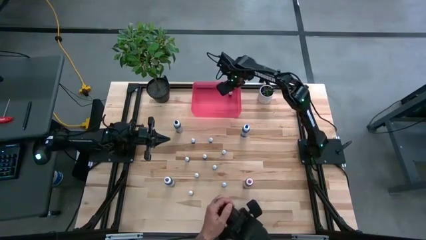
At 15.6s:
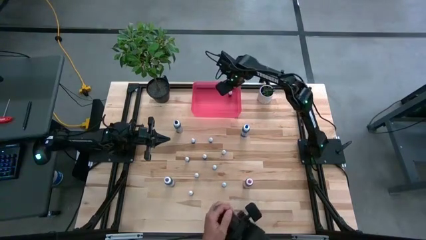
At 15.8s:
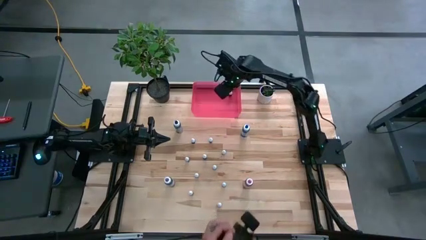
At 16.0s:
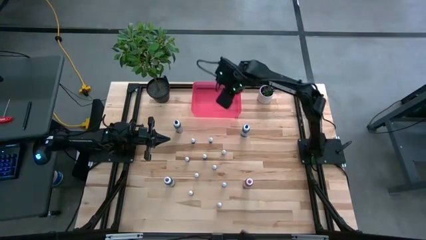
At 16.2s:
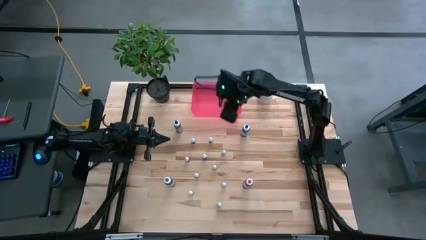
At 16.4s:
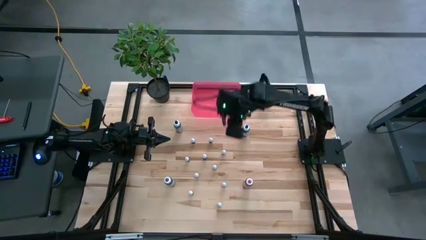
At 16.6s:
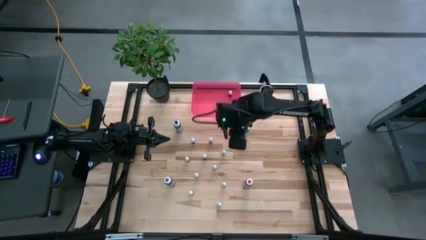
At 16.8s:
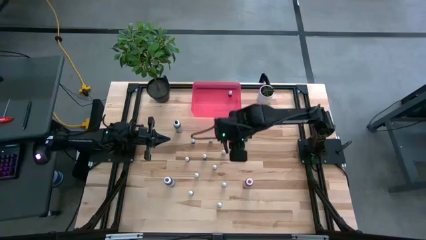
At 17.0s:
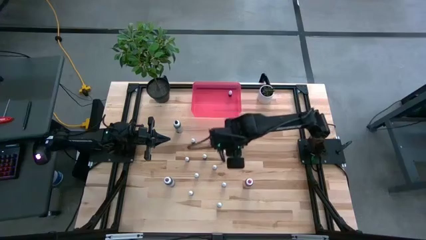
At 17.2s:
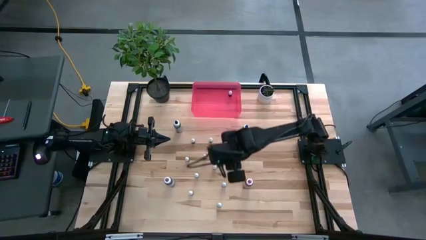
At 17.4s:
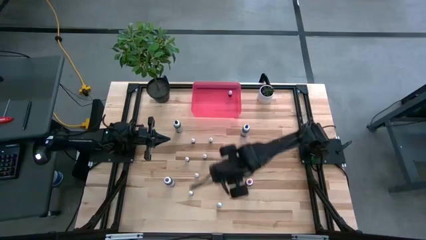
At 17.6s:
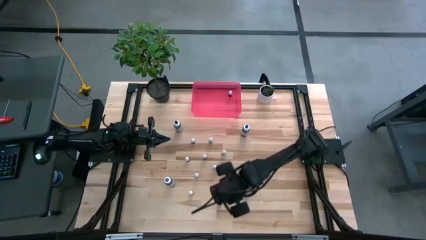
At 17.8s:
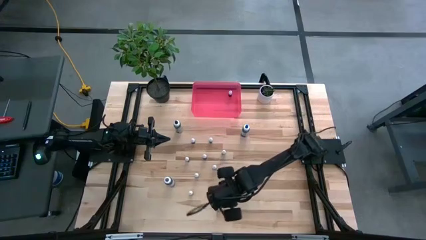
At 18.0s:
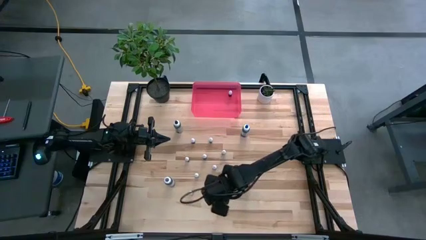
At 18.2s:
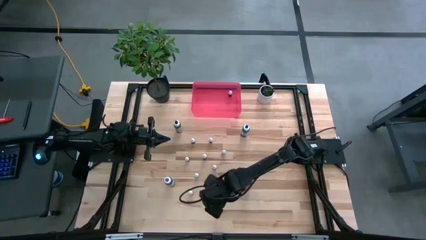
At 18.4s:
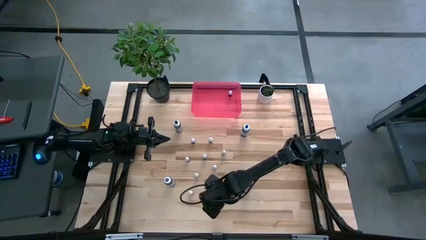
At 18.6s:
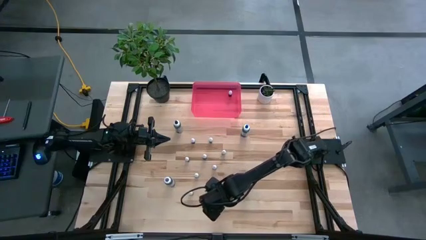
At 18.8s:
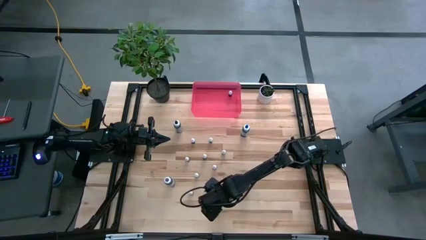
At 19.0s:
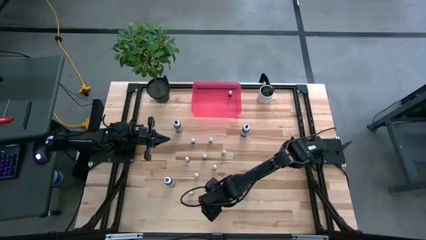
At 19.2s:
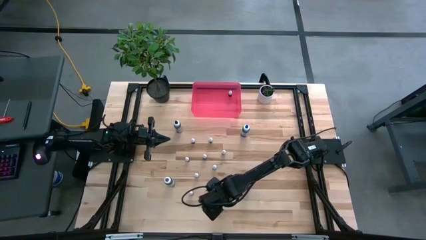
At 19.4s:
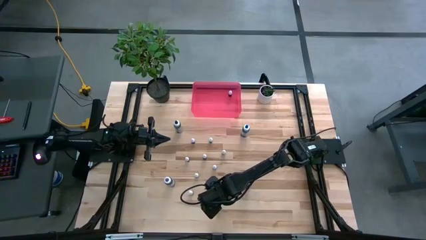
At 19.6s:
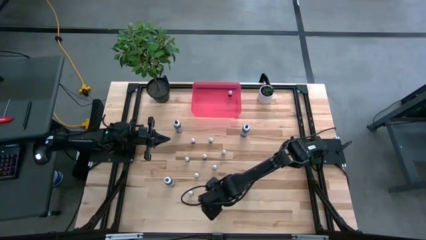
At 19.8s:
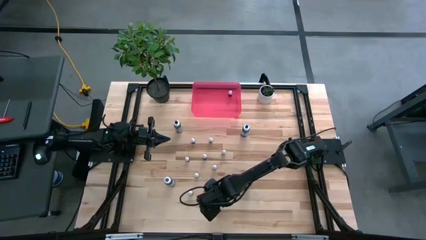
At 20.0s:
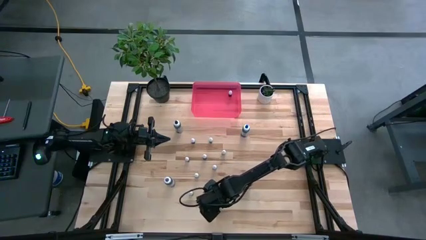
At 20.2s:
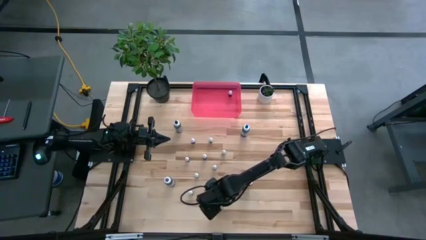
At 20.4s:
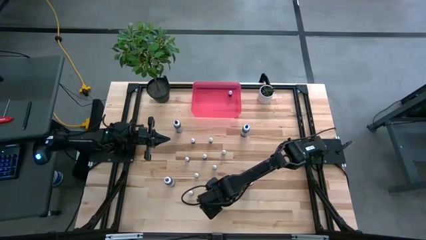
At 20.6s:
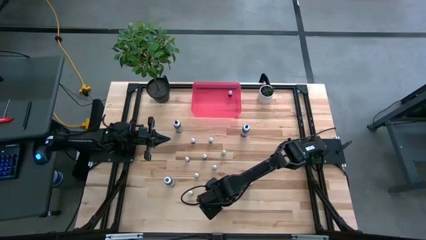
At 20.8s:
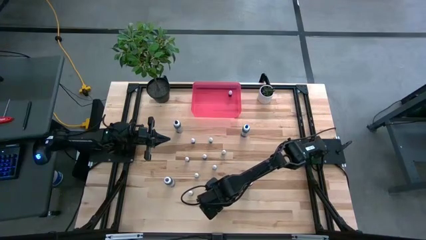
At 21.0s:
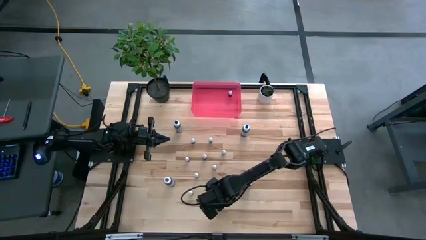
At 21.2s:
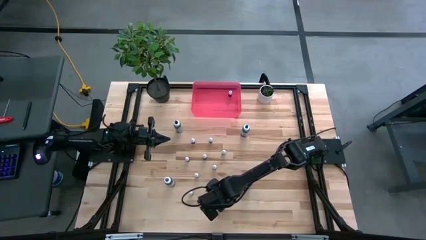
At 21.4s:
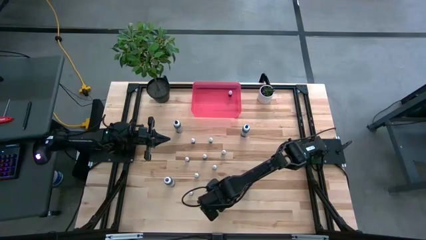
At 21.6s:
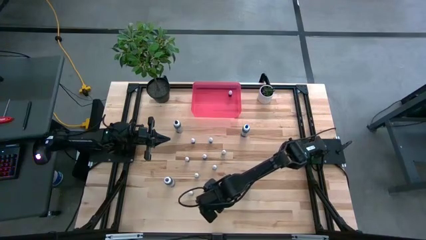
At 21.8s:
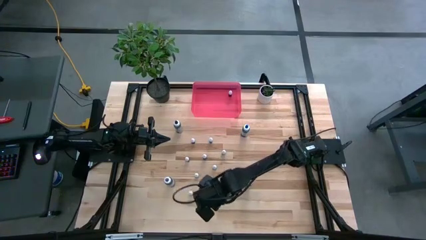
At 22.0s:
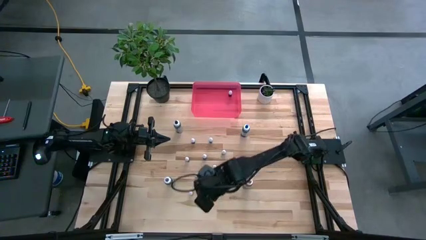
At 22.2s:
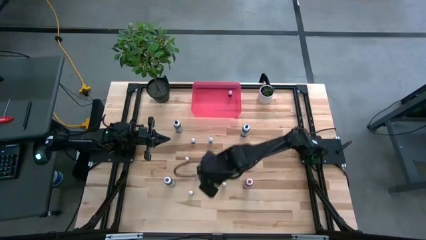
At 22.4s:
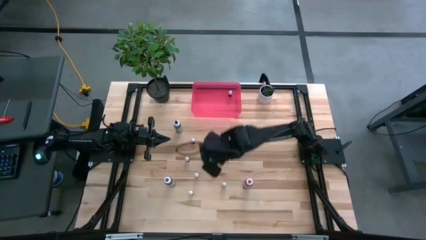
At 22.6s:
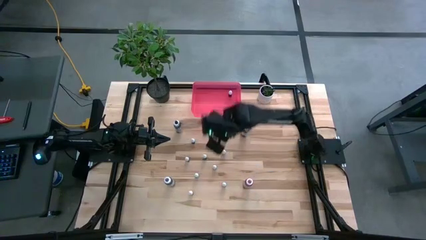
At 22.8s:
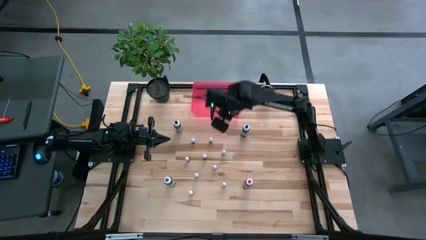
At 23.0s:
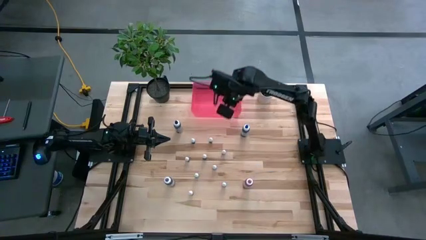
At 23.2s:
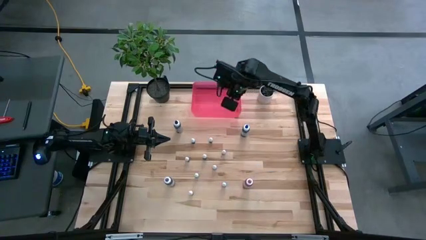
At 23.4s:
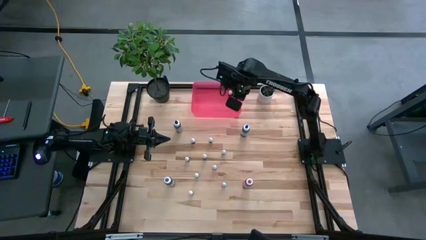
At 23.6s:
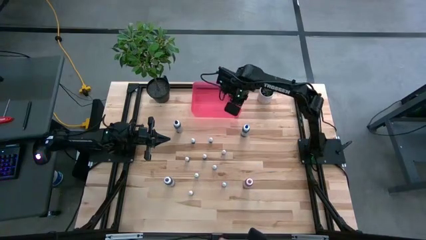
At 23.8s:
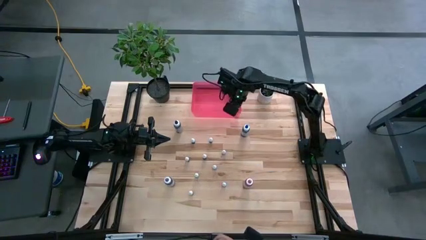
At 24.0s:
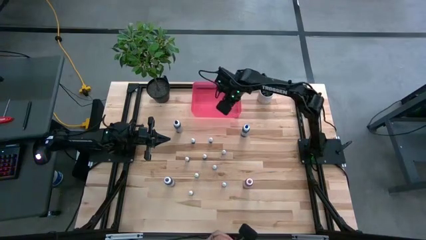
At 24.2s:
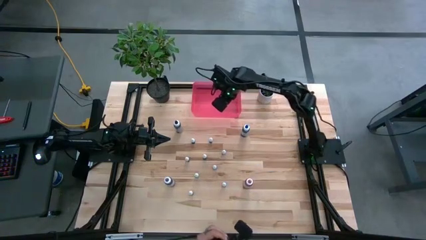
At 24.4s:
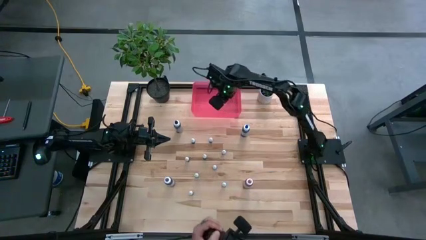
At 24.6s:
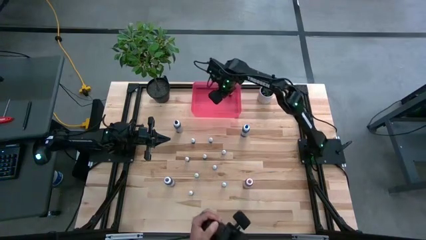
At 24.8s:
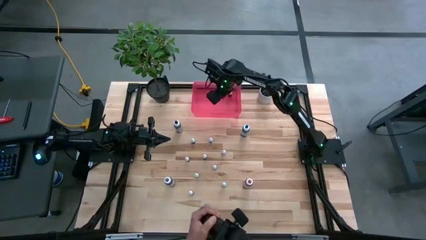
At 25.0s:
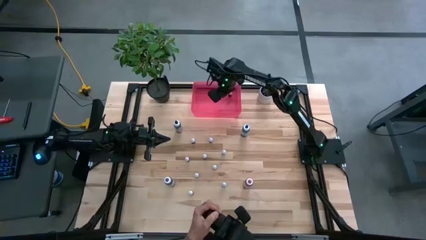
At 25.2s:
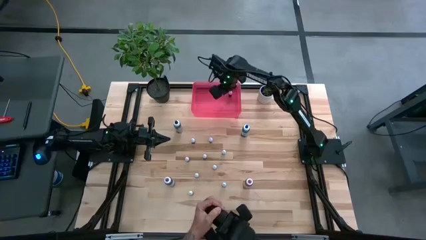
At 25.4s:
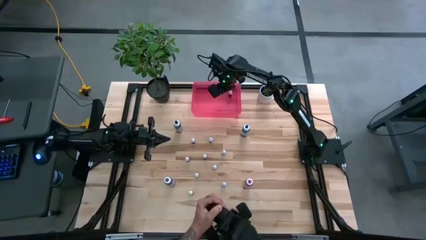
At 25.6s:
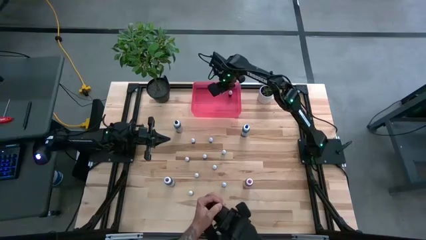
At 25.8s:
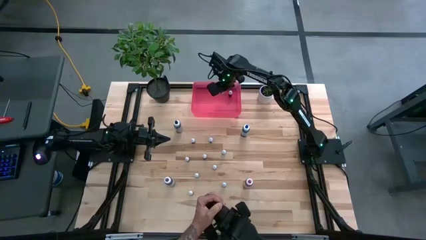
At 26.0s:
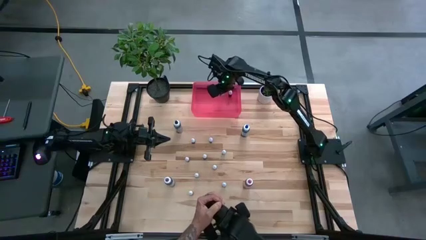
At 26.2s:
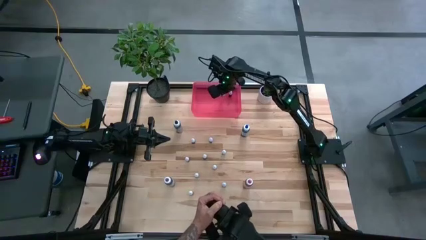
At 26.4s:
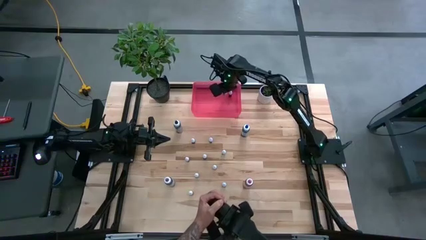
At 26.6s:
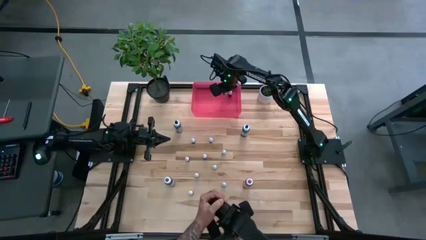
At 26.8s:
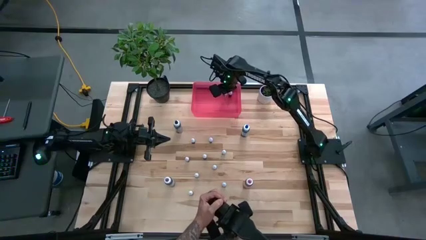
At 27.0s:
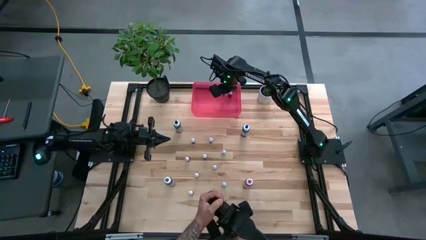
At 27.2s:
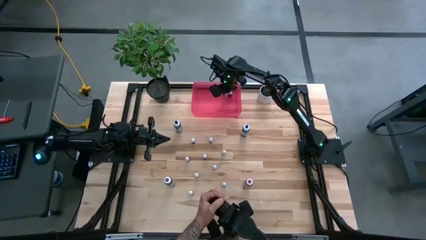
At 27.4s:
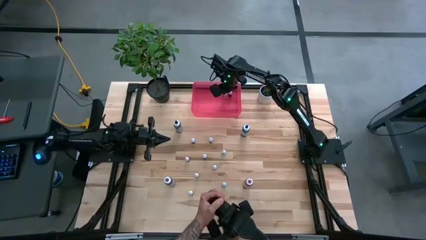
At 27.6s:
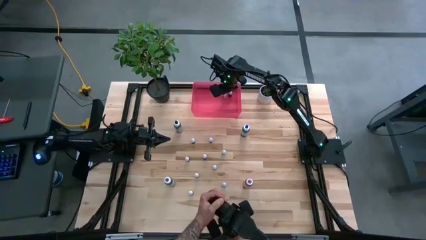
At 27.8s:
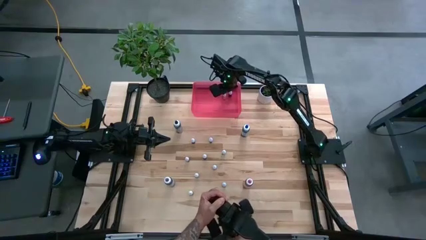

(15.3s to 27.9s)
Task: Pick & Place food coloring
Put the small blue food coloring bottle into the red bin

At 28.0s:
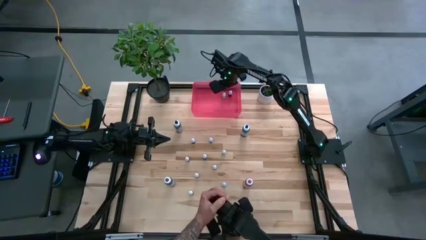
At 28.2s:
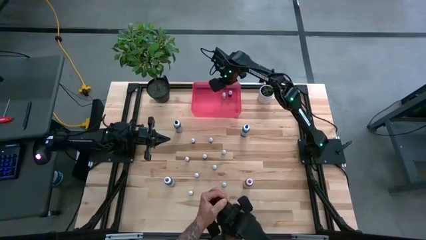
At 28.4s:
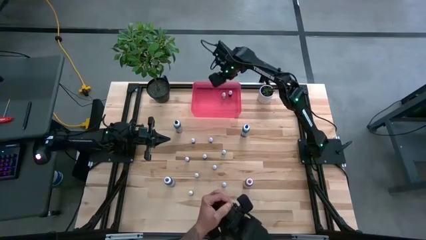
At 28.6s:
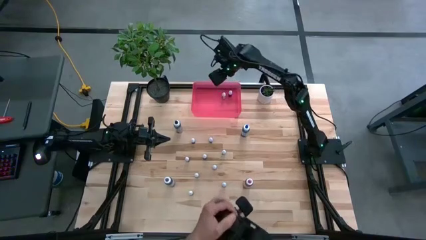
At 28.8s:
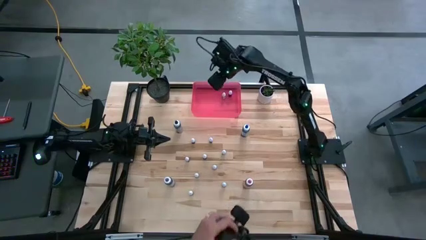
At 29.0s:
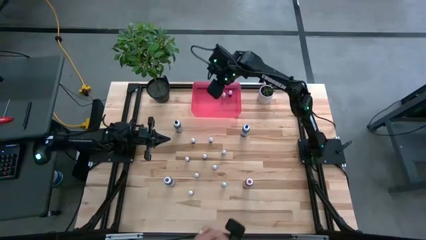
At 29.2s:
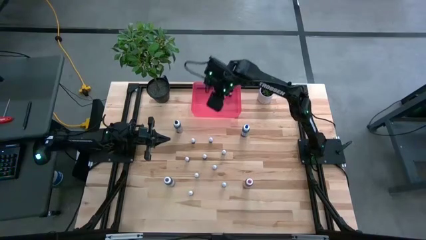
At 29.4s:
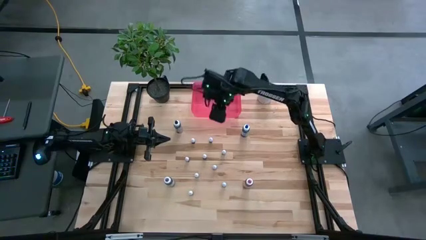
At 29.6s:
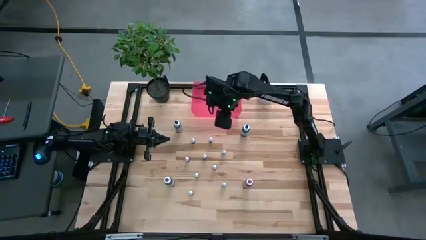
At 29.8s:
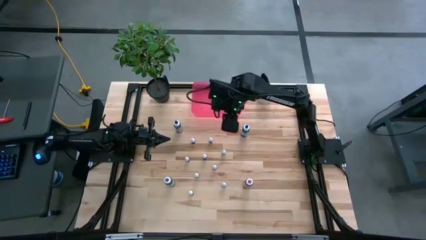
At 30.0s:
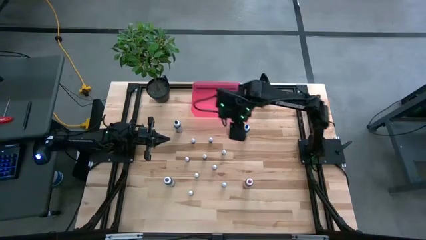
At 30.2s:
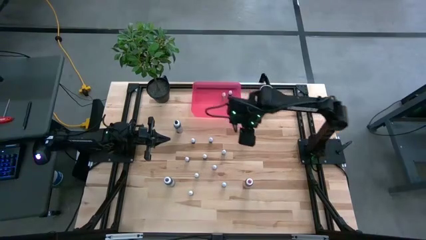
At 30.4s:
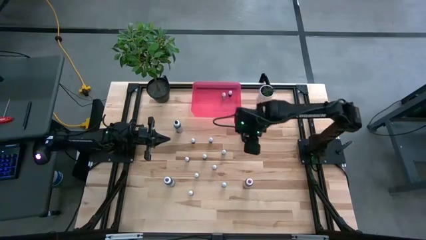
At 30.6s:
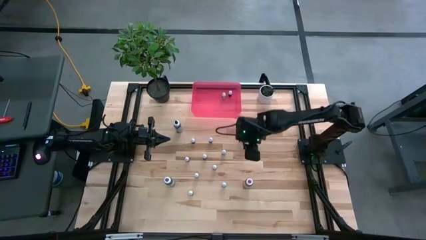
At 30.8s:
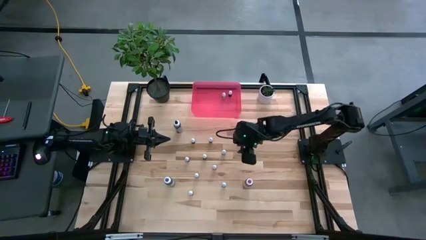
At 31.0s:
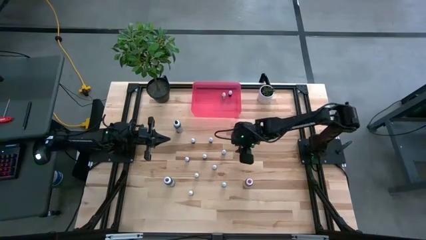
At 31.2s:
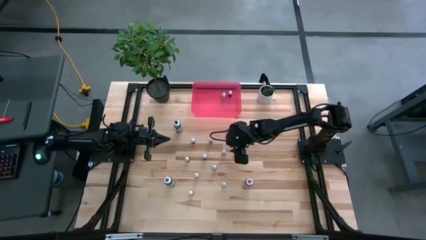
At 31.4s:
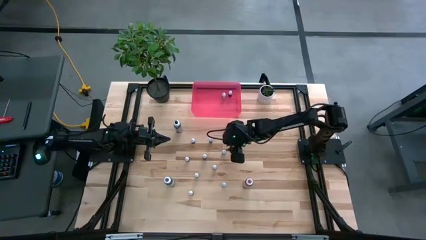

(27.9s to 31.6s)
Put the small black food coloring bottle into the red bin
